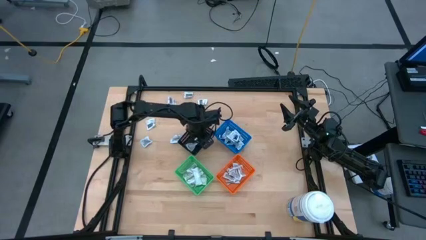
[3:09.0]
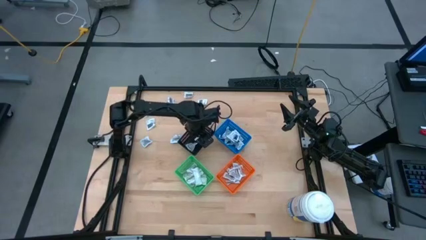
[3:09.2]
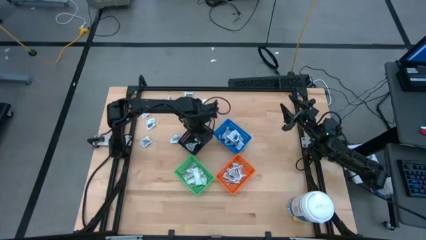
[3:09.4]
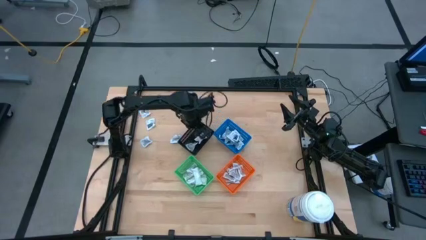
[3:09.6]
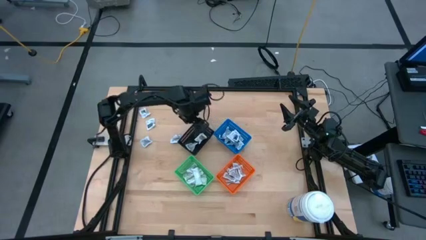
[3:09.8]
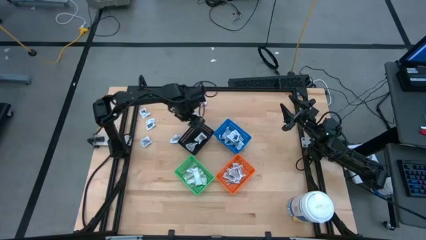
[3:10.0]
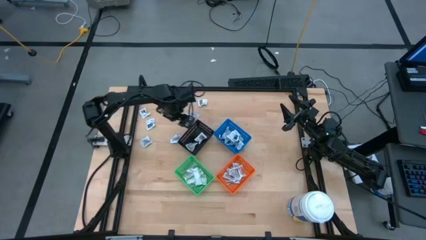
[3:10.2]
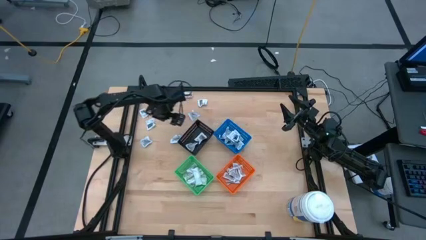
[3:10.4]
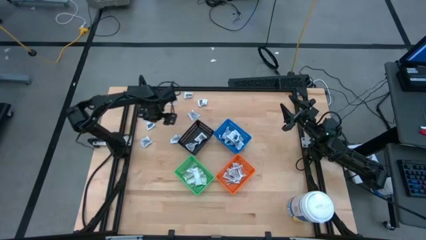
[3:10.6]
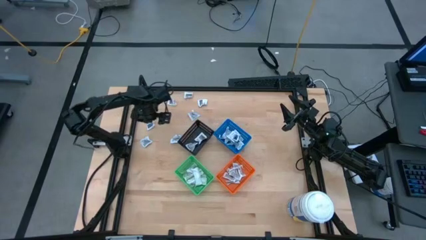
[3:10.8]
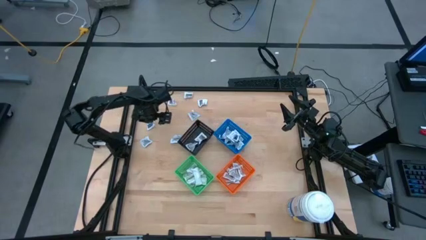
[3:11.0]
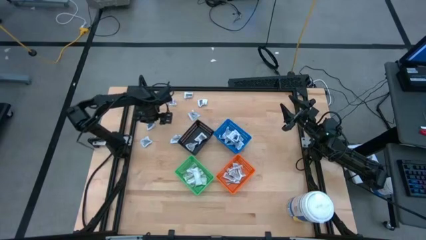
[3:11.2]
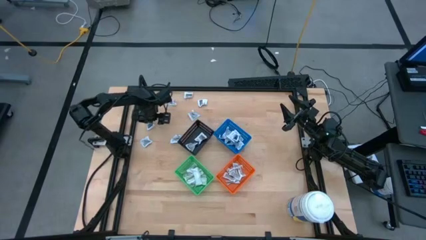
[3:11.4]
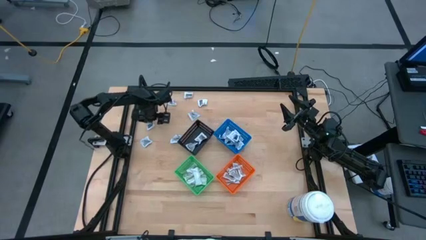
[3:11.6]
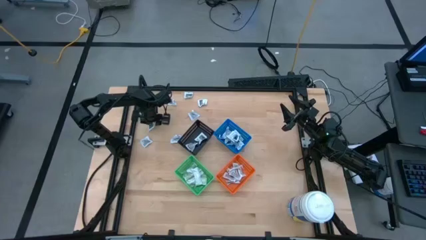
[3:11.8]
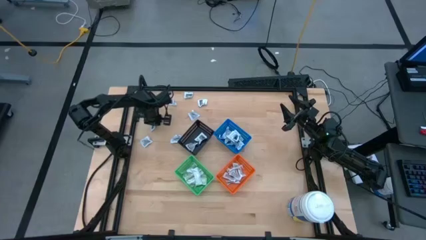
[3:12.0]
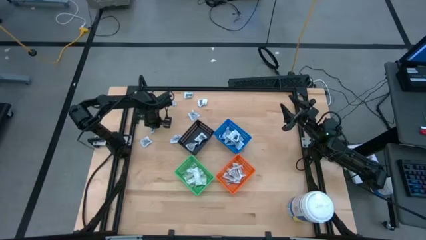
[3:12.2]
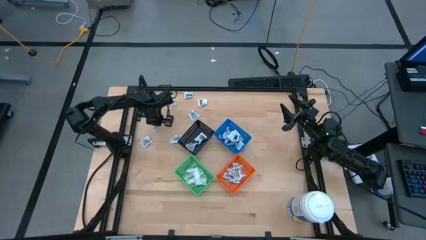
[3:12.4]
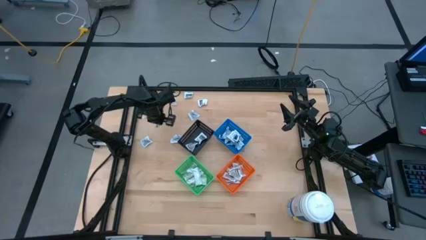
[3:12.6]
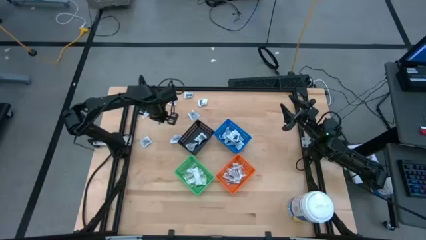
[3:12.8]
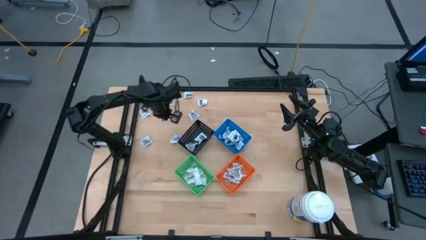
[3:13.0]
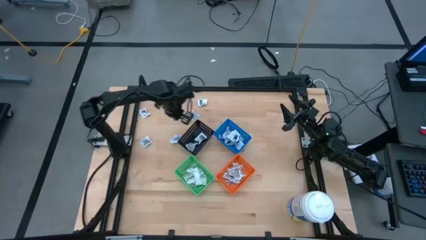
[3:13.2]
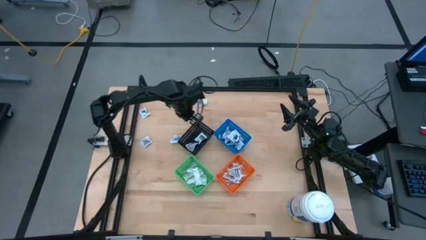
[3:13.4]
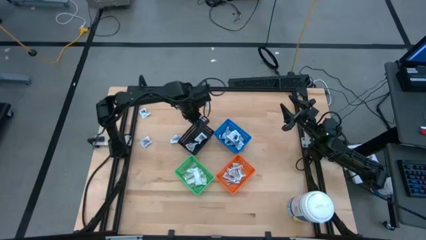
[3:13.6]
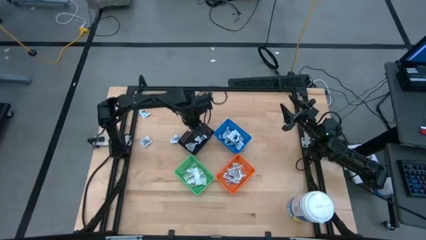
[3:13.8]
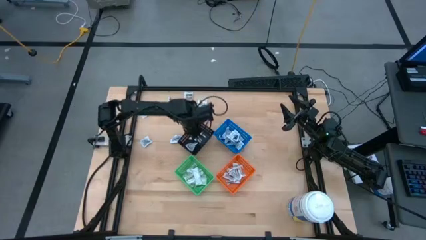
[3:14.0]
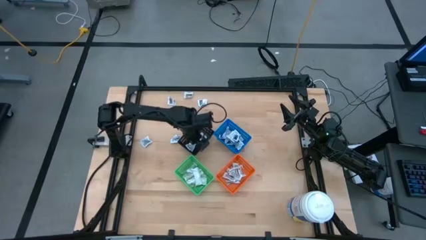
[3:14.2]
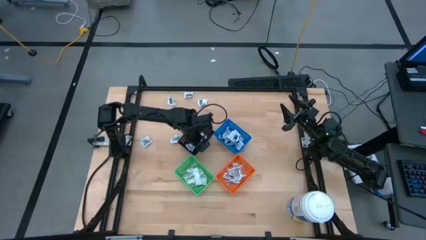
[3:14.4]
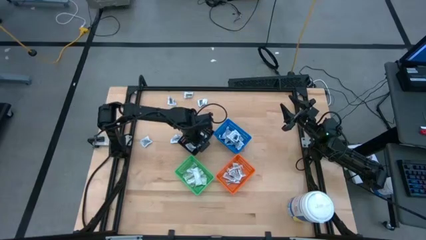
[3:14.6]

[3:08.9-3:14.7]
Task: Pick & Place First Aid Supplies
Put the black towelette pack into the black bin

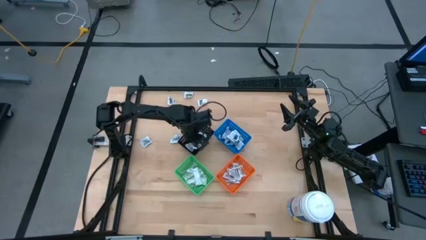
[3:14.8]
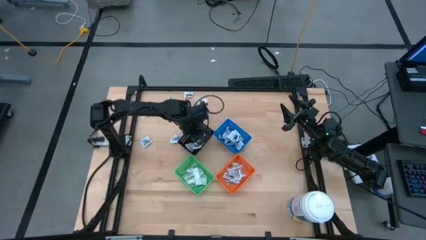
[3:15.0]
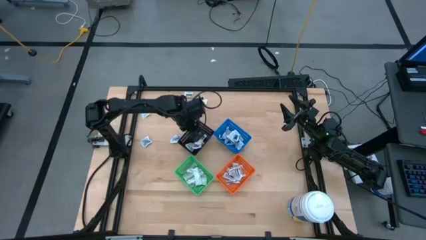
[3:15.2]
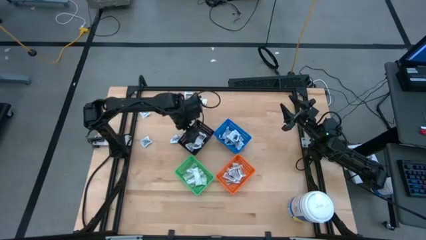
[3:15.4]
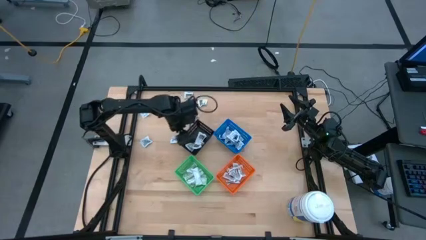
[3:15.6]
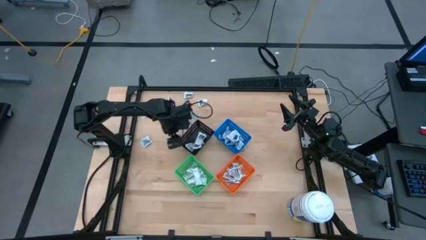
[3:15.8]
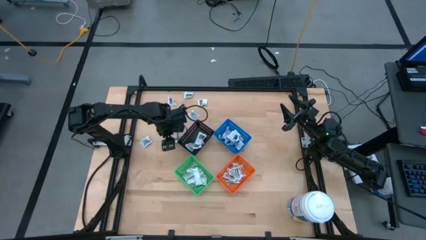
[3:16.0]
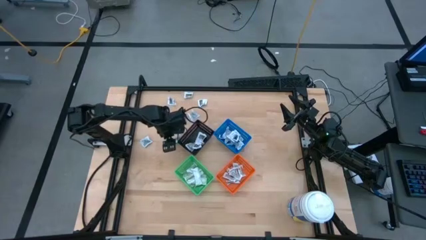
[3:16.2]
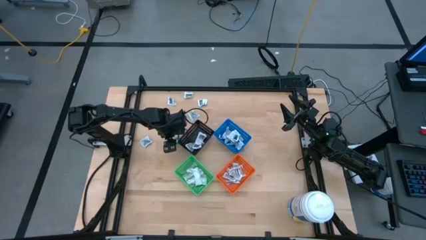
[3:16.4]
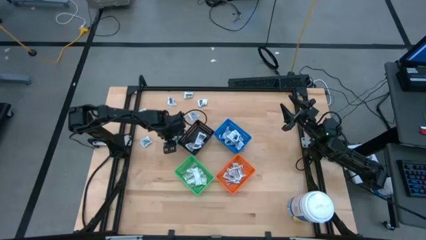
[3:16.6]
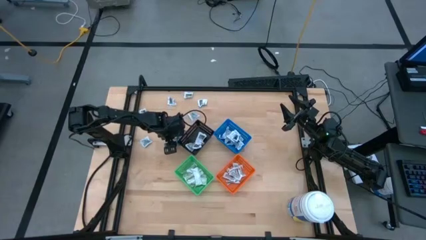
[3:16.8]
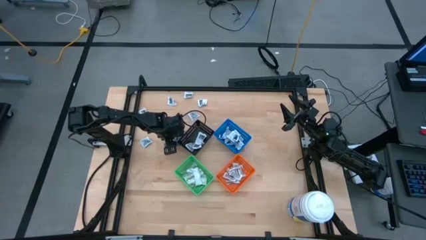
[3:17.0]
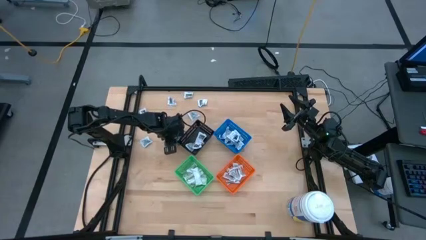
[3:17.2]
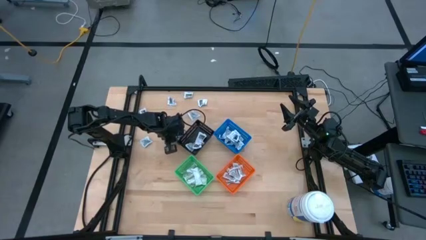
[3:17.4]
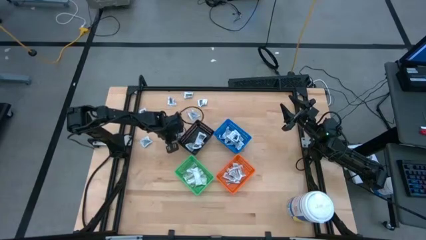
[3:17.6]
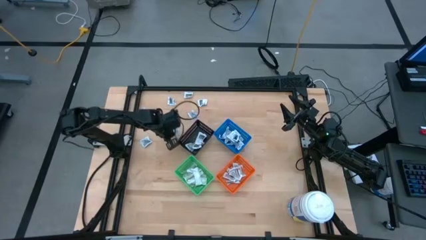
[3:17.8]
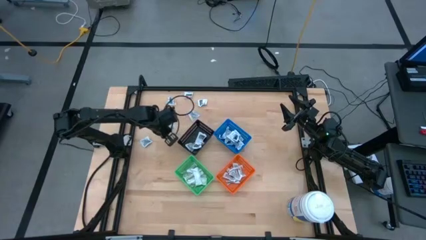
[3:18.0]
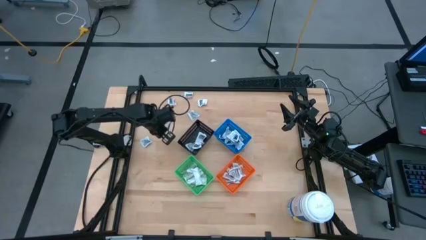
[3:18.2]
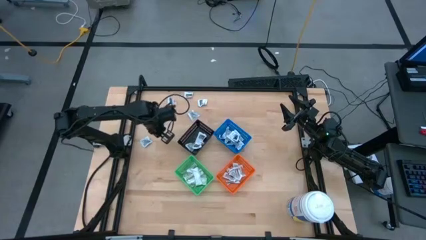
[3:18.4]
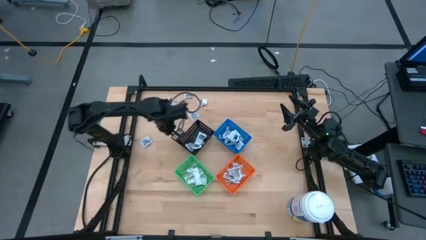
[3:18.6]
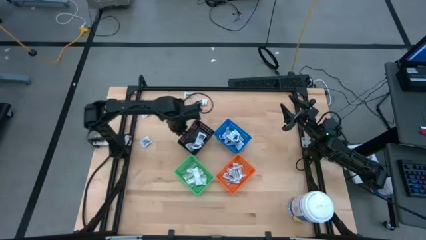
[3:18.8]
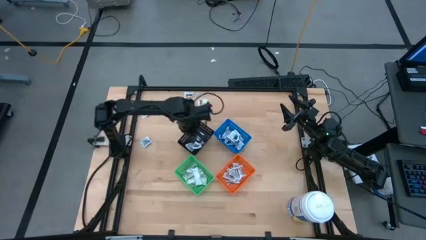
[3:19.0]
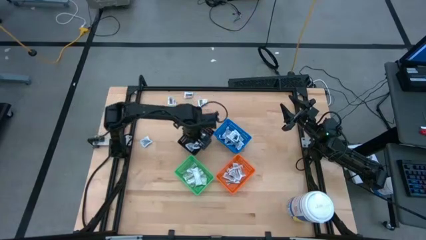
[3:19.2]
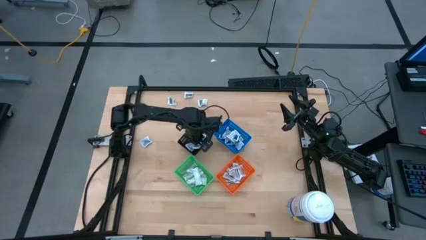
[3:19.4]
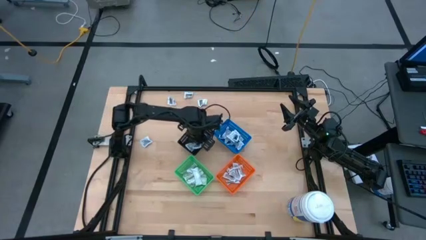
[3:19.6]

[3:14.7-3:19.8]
Put the black towelette pack into the black bin

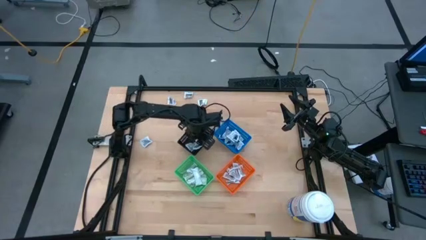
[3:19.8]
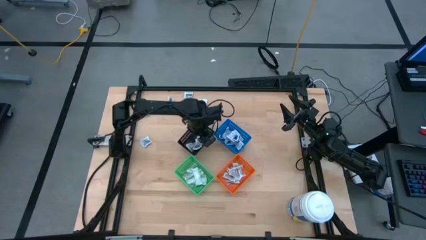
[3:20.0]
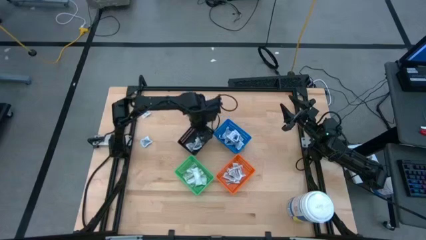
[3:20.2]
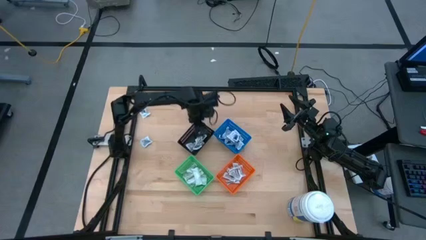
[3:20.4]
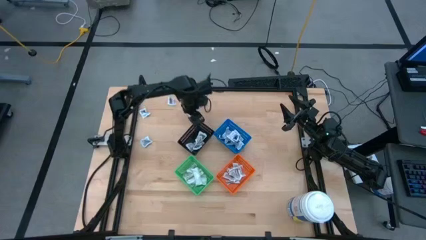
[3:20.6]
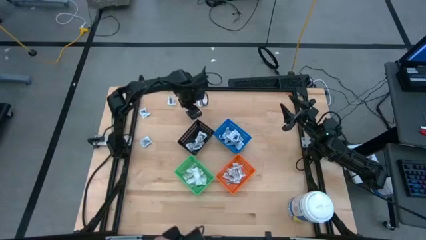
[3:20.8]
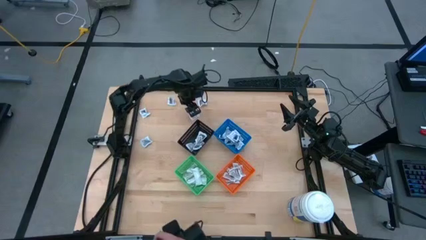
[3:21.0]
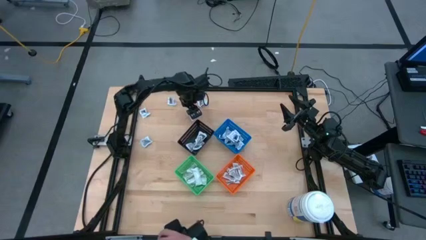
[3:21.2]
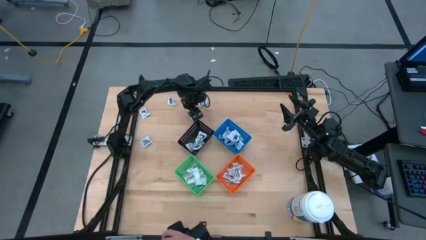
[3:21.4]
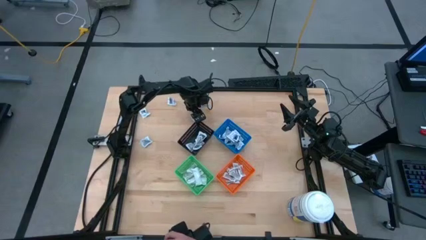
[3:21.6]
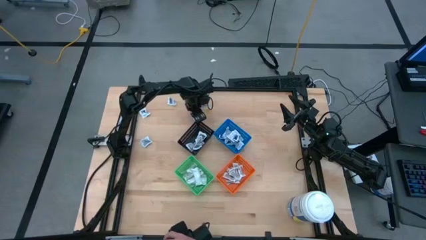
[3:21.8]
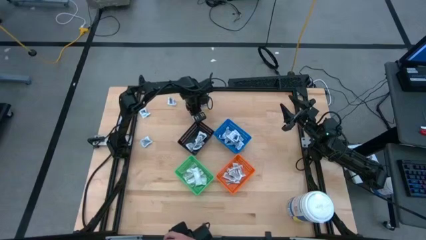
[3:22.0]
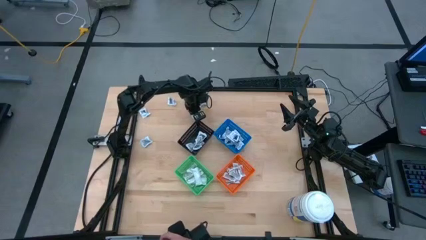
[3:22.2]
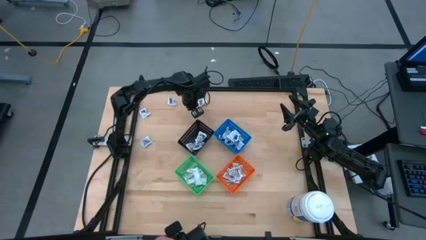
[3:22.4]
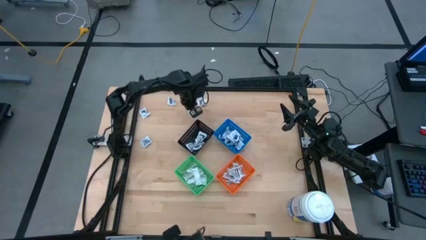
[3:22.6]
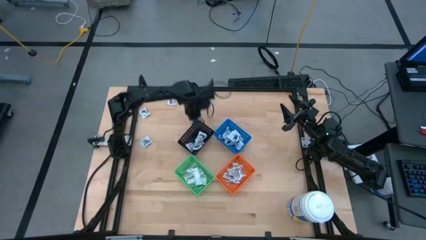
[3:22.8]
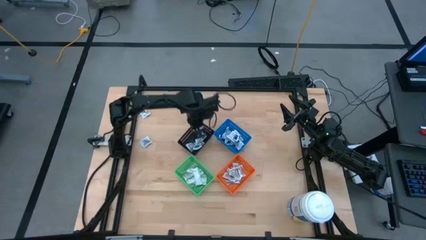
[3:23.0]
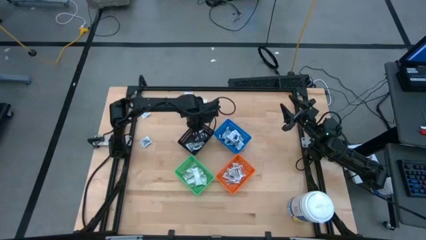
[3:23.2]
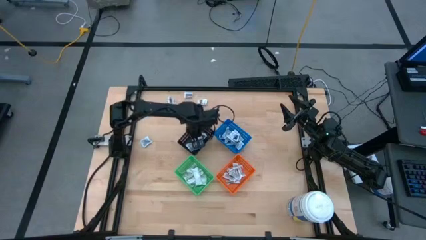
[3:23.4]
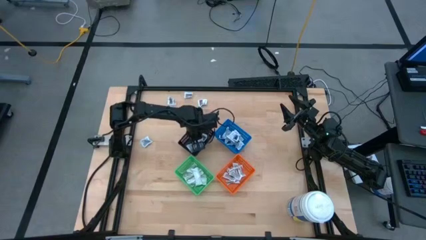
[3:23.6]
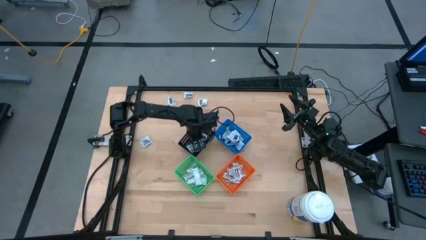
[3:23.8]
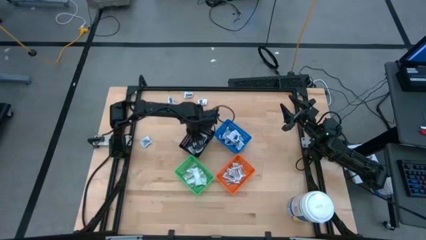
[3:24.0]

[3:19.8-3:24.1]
Put the black towelette pack into the black bin

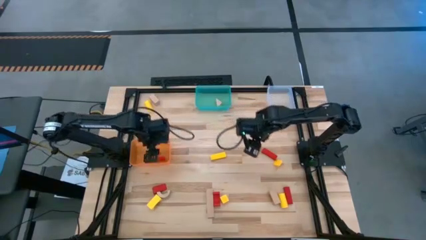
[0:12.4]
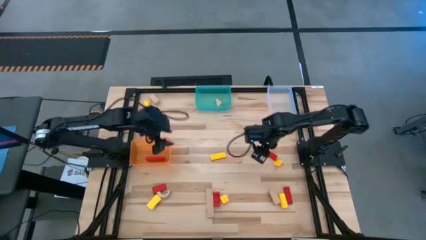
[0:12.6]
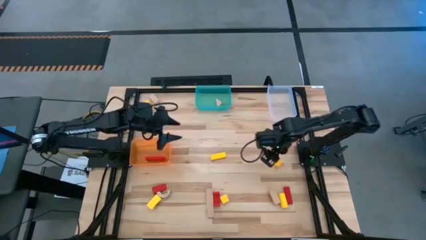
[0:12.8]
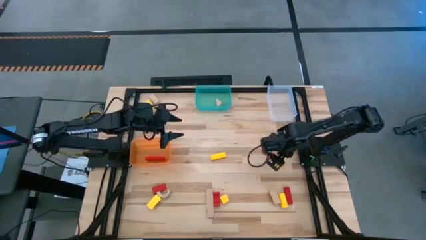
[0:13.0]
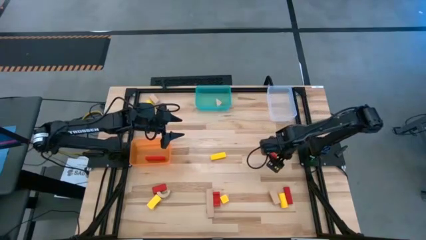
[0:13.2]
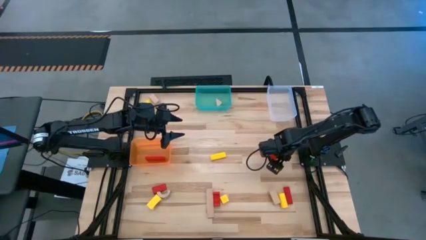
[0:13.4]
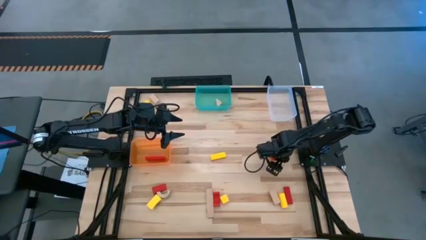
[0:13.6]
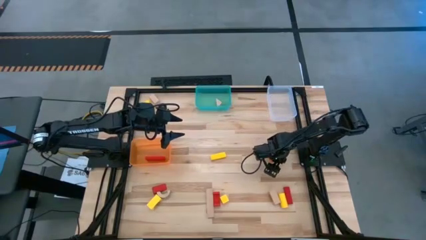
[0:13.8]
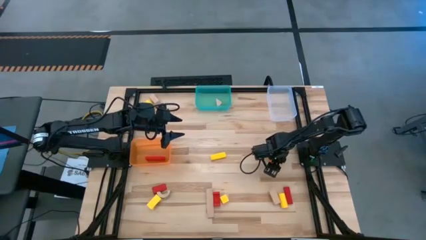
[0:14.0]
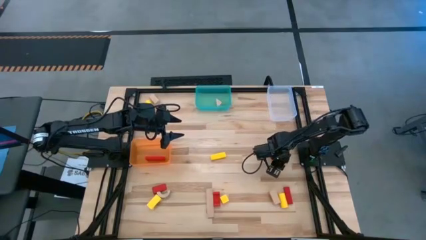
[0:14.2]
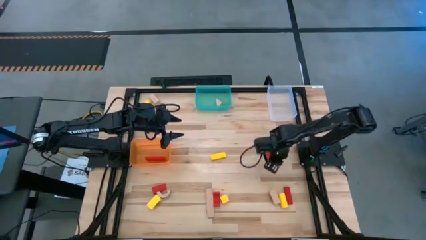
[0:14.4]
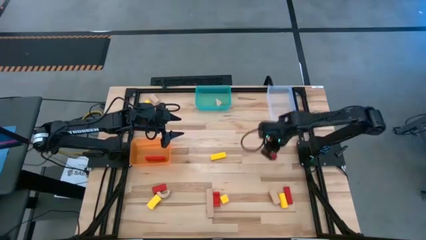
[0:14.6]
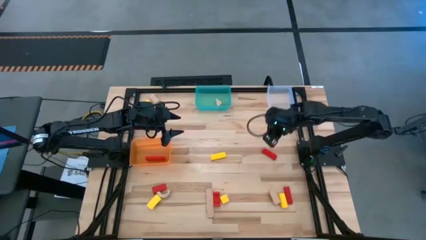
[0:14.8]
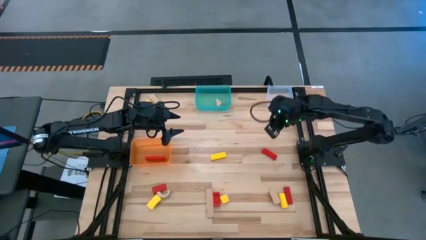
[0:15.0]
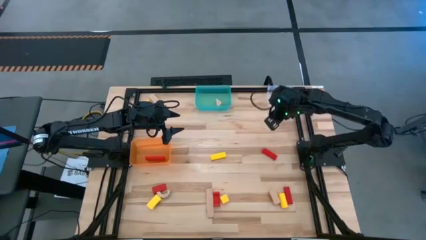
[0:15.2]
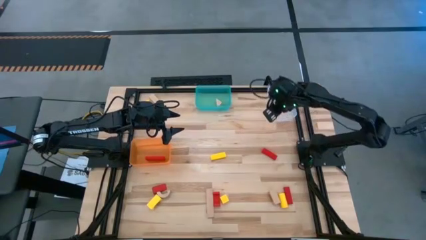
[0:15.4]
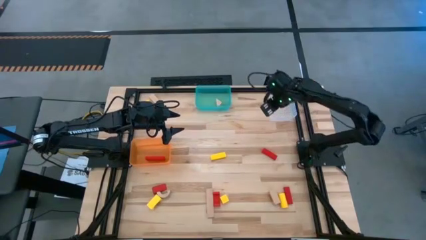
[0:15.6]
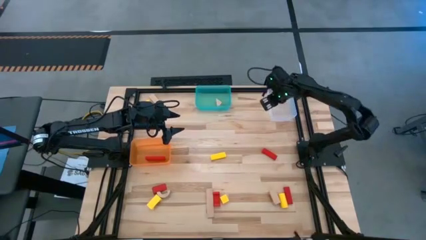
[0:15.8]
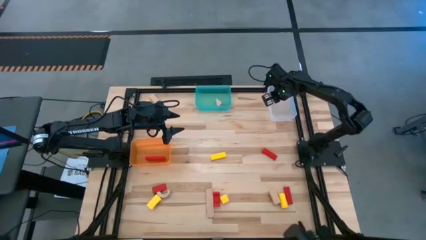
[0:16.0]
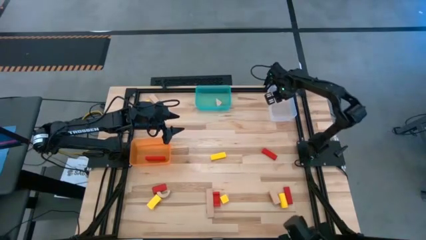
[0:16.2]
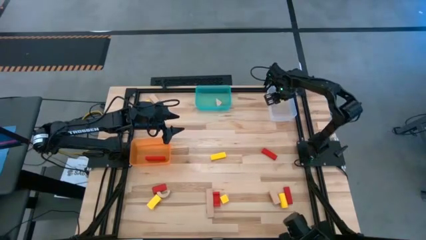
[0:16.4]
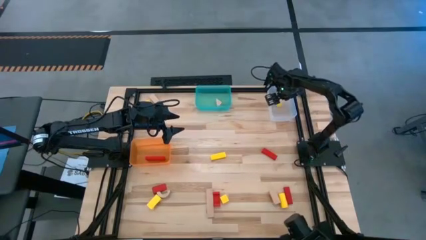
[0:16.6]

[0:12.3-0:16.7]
Task: Sort & place blocks by color
Put the yellow block into the transparent white bin
